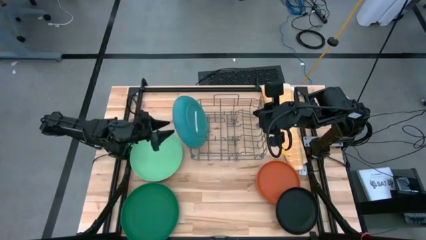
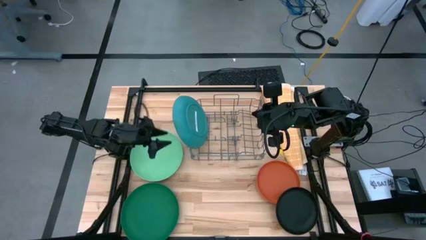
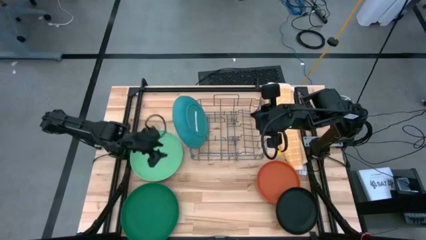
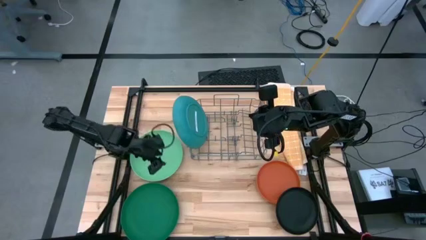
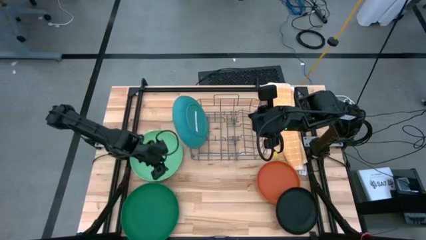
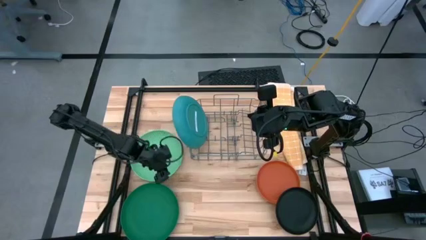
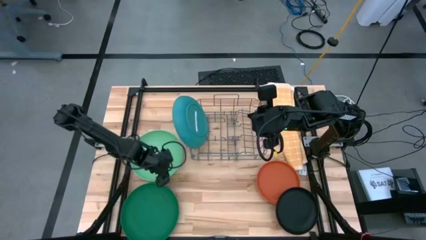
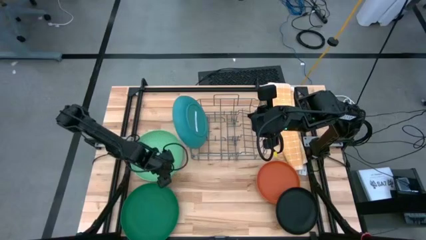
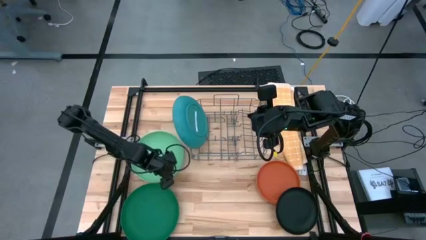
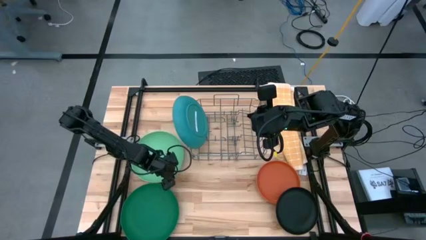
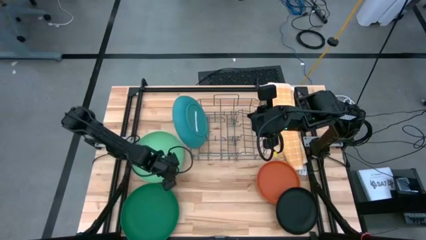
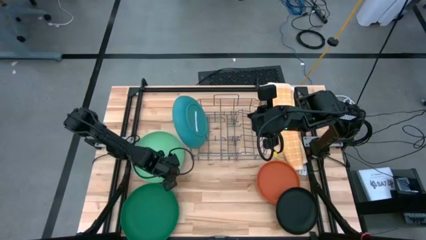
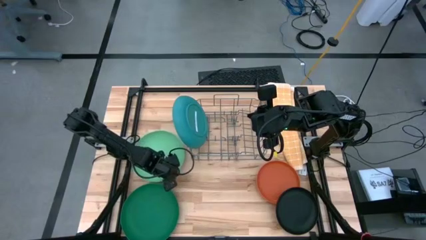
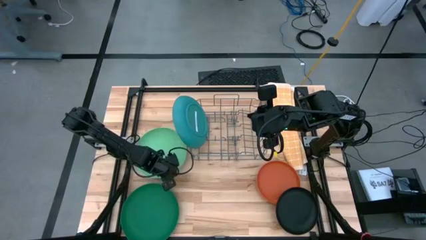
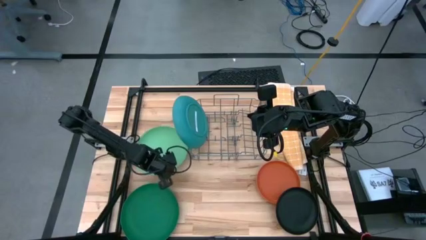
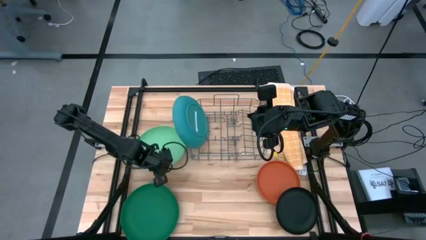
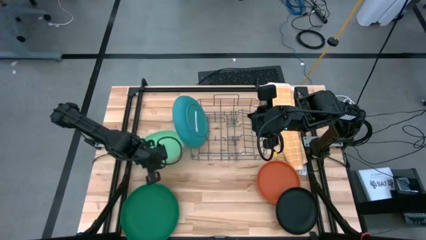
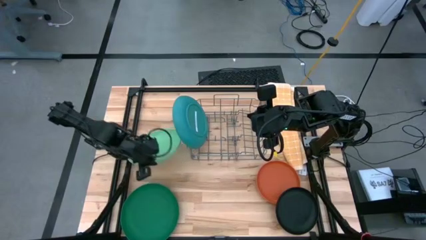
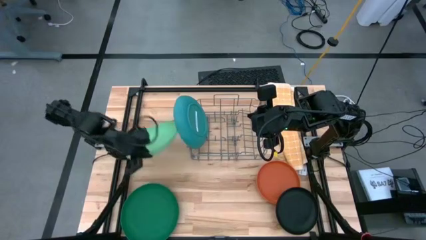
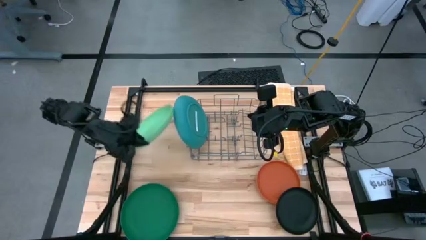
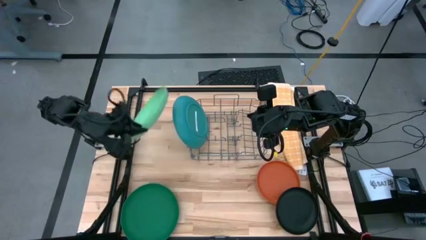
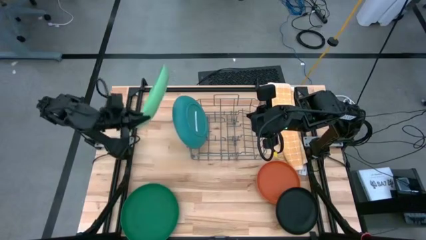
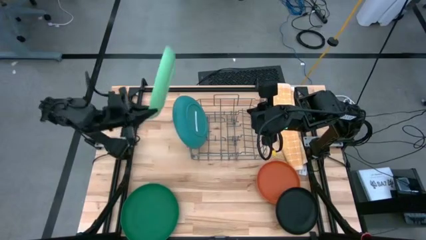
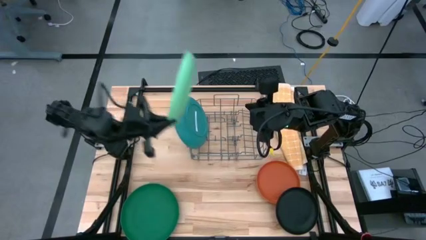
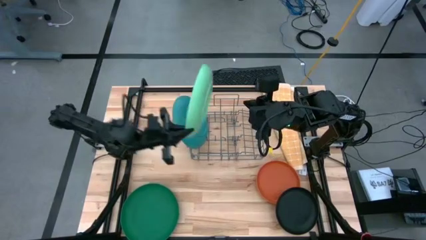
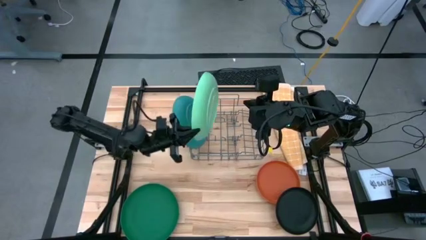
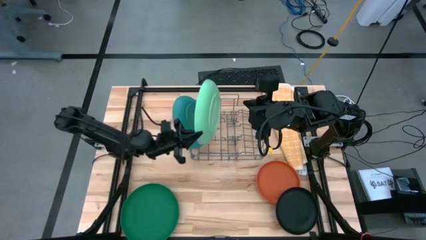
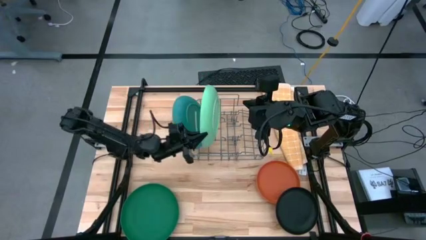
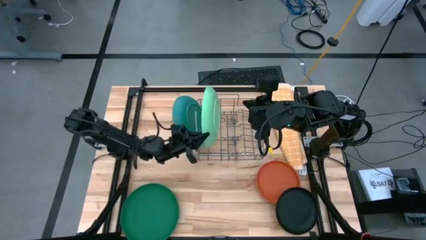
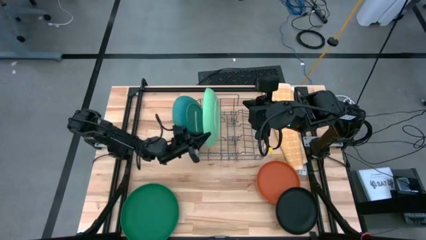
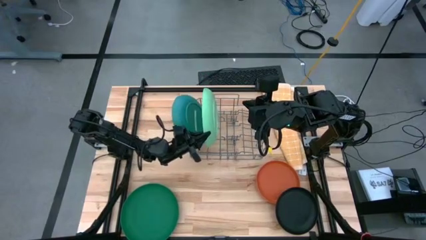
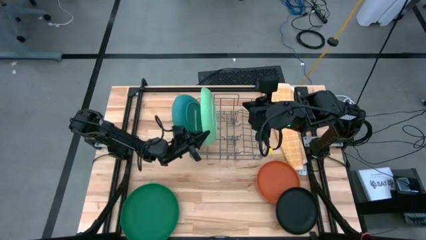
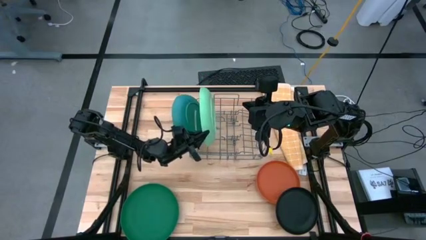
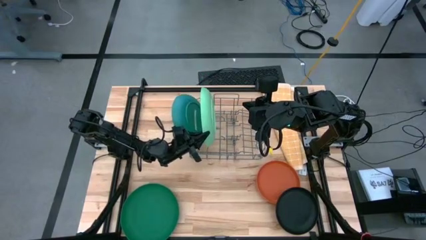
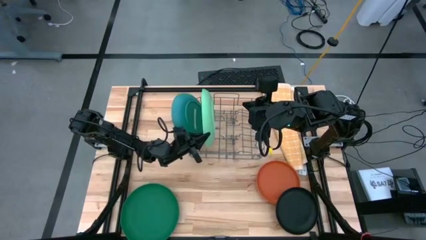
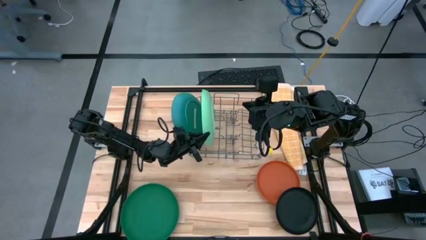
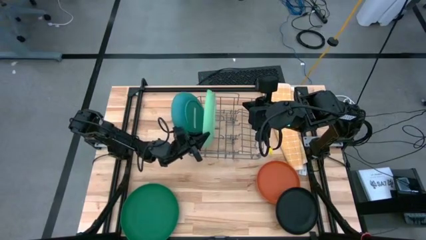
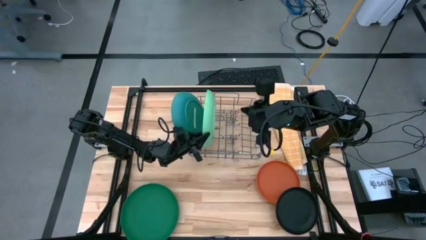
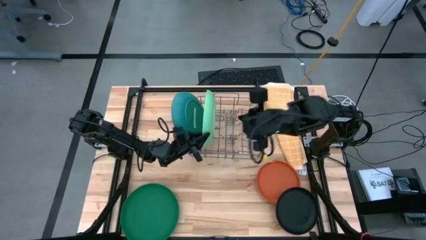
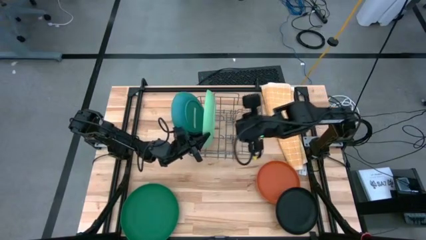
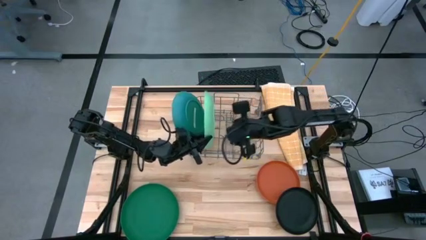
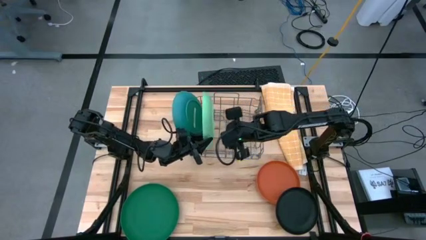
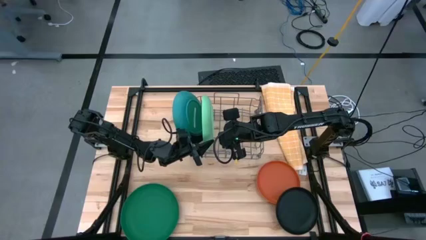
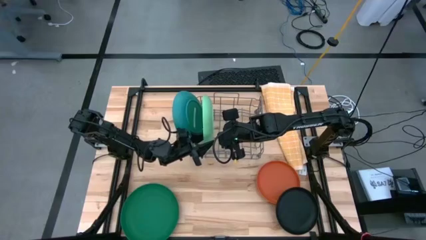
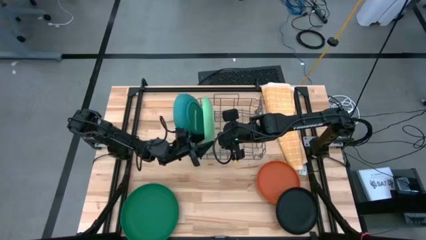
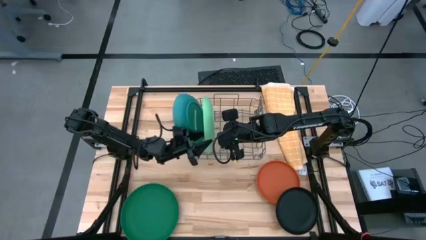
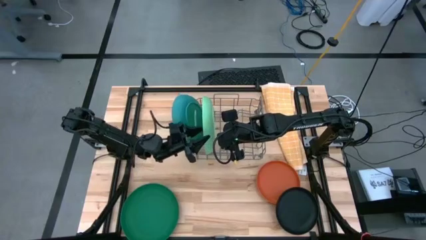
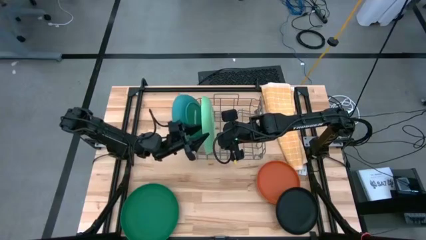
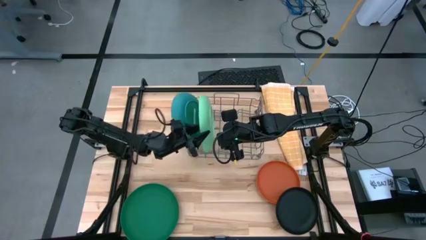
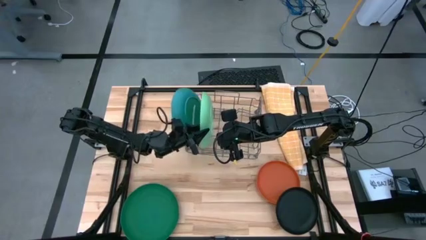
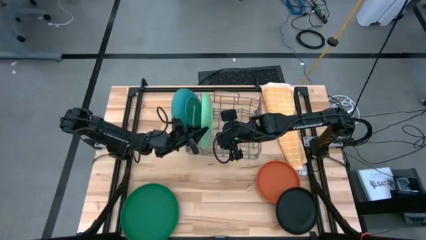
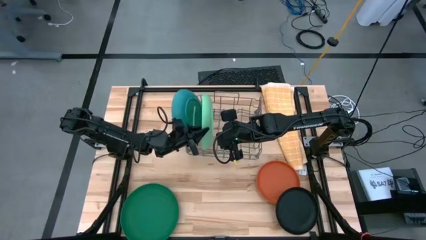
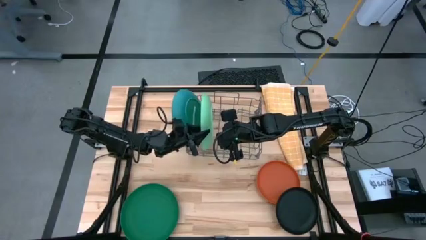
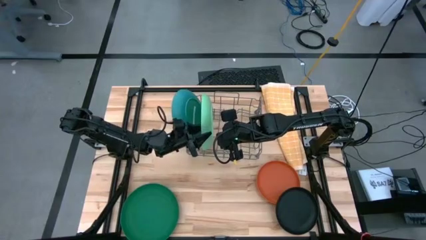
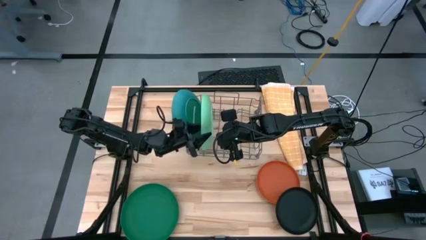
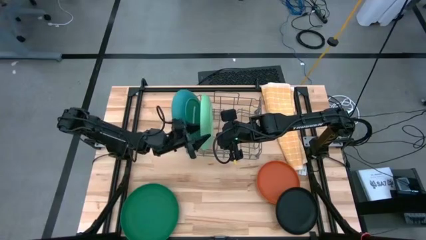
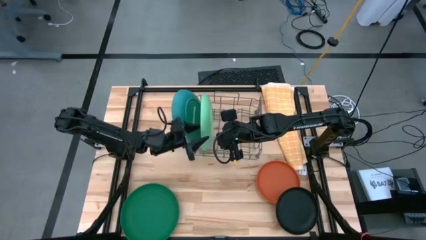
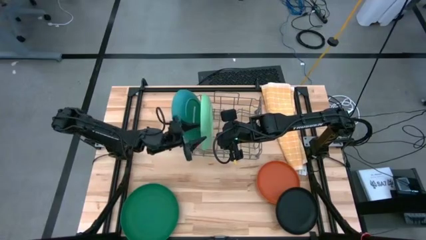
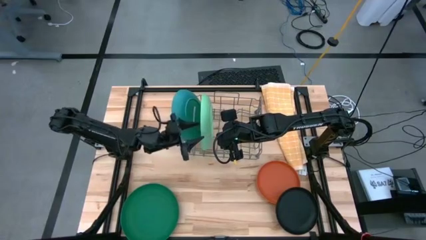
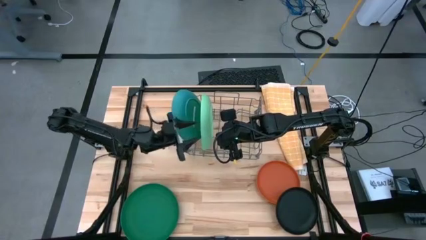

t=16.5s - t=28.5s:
Task: Sort dishes
Put the light green plate into the dishwasher rack

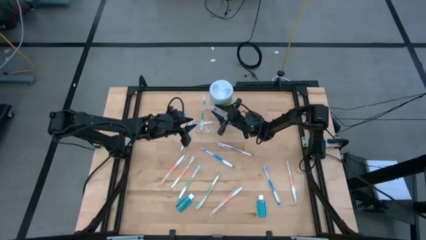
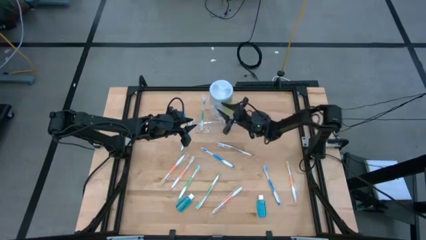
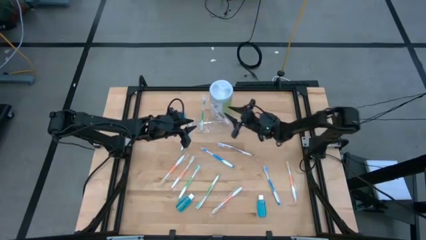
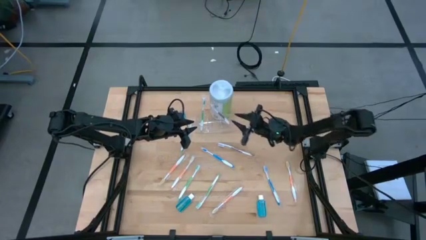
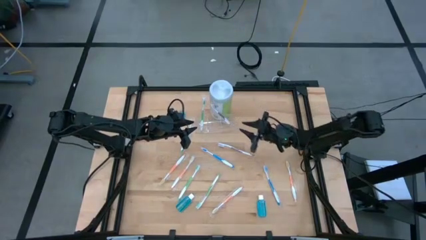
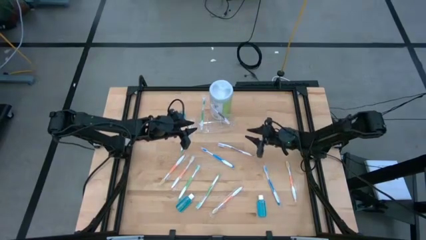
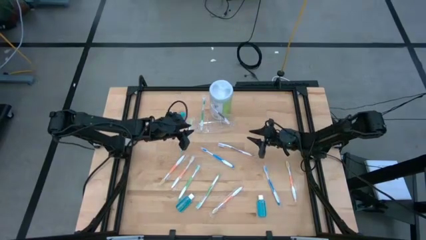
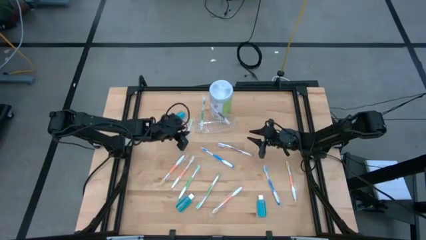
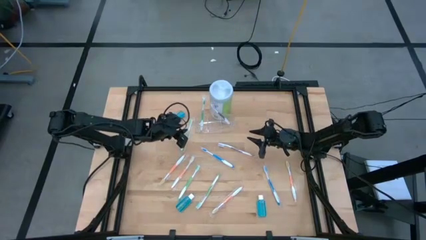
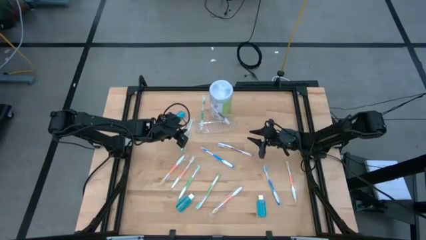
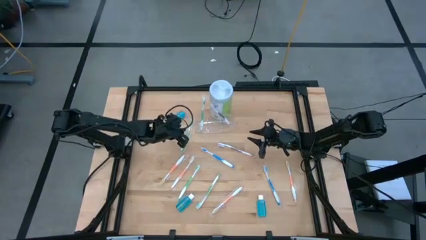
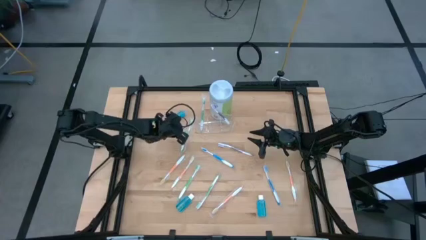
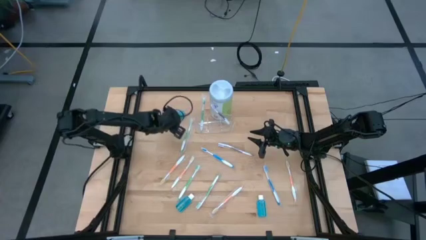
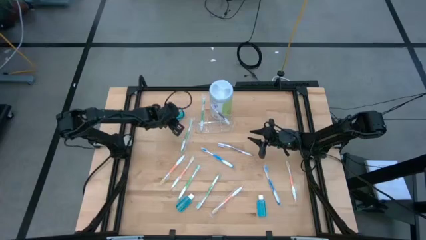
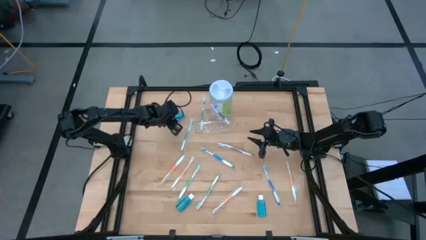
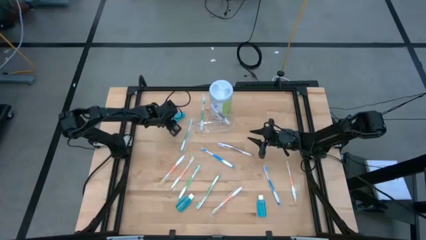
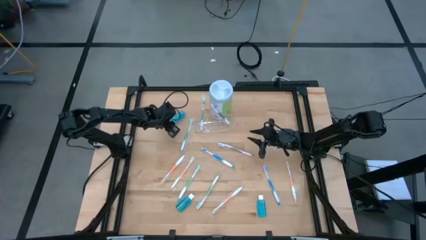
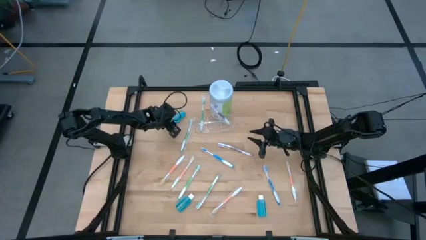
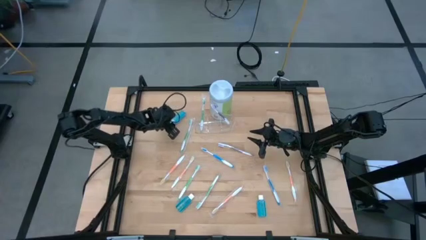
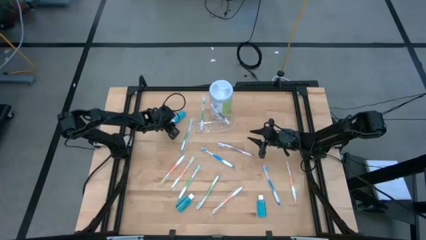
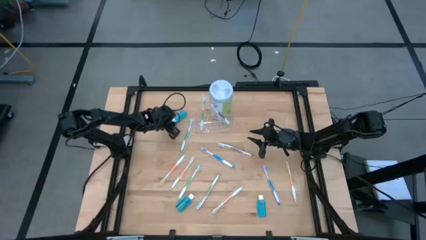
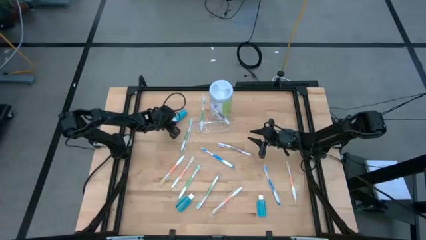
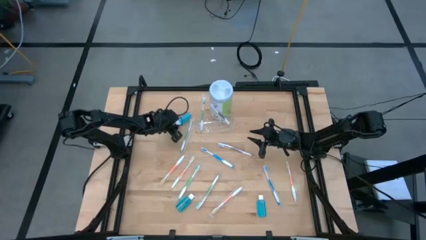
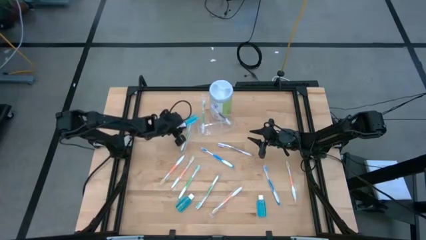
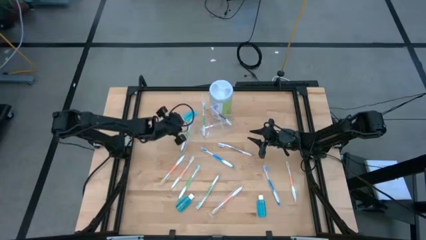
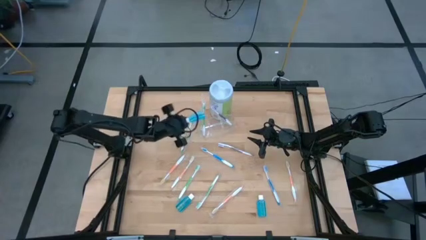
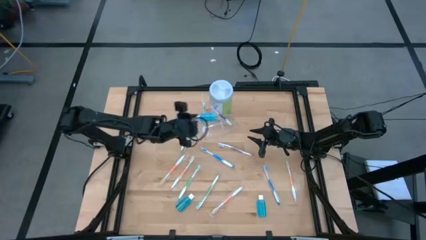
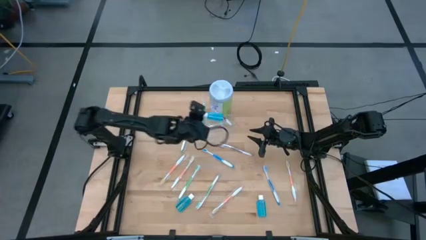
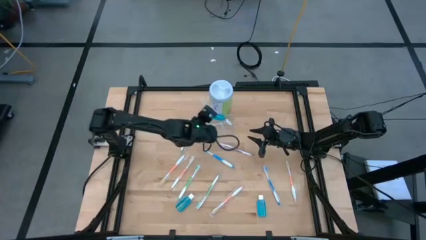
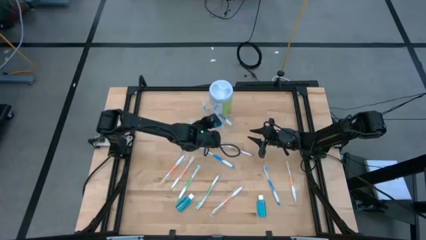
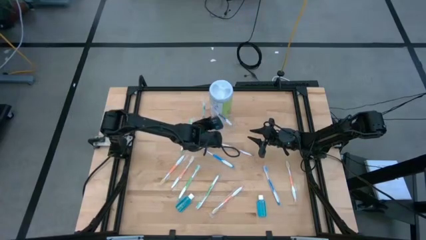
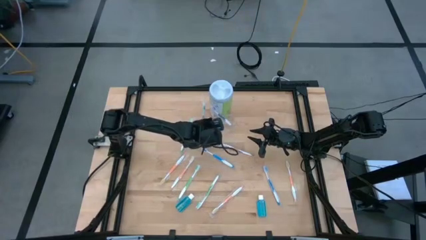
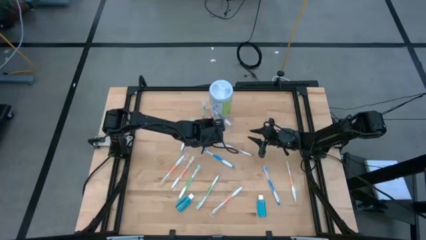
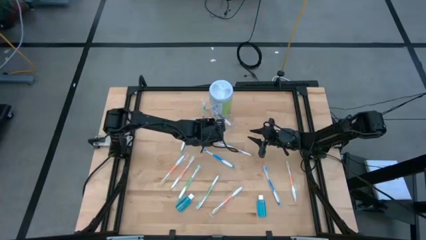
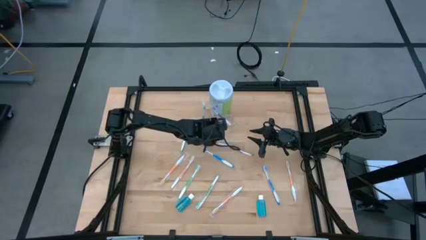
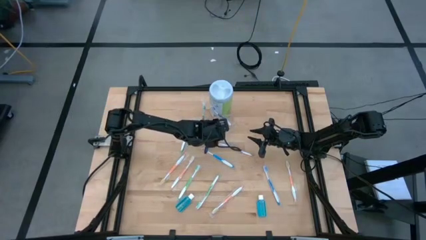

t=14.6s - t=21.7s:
Task: Pick & Place toothbrushing station
Put the top mouthwash bottle into the transparent organizer
